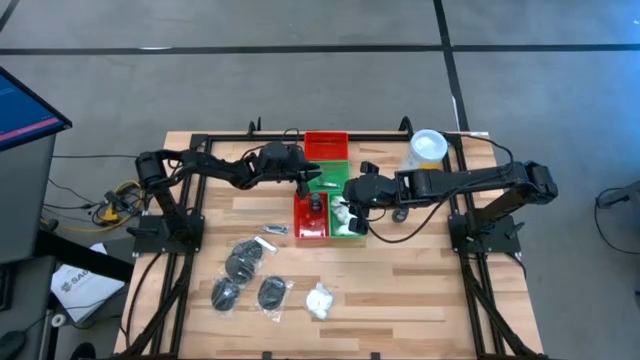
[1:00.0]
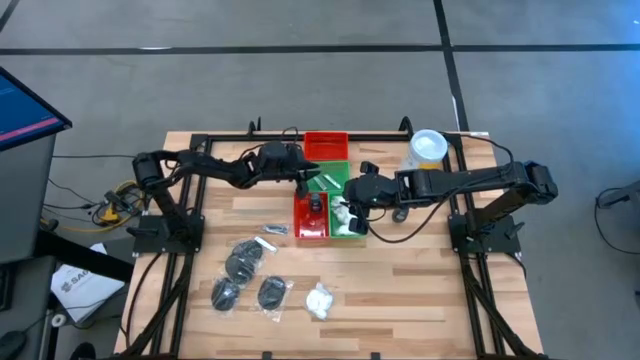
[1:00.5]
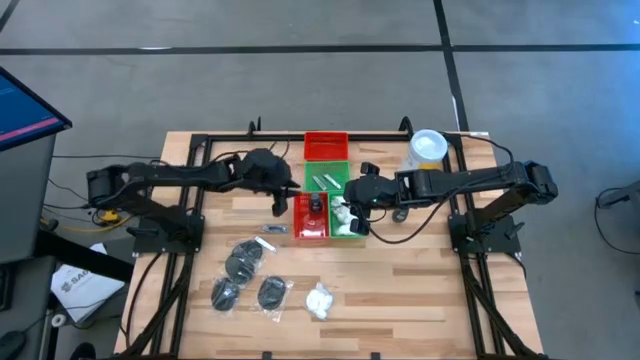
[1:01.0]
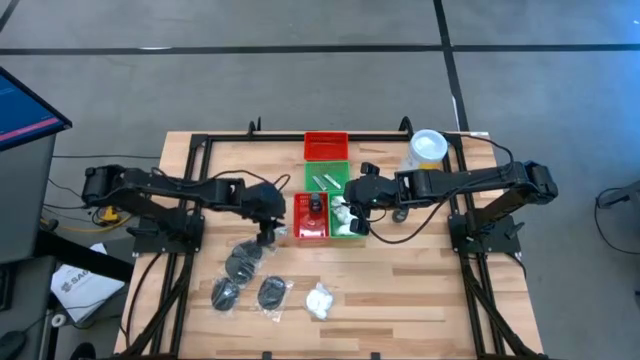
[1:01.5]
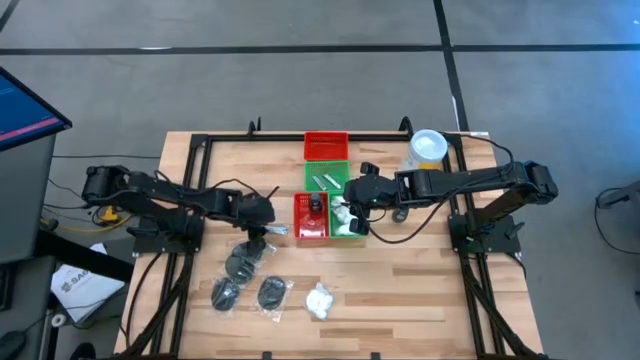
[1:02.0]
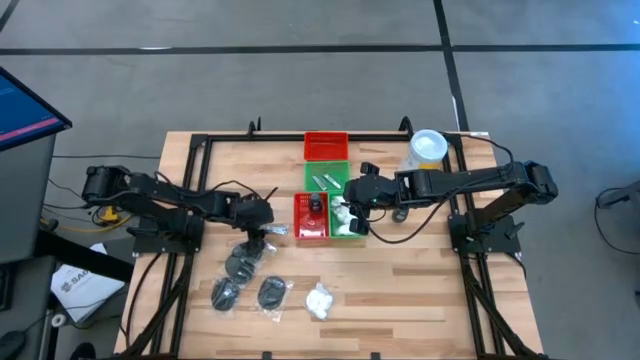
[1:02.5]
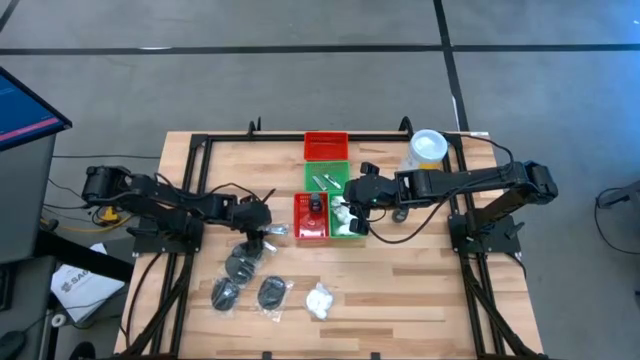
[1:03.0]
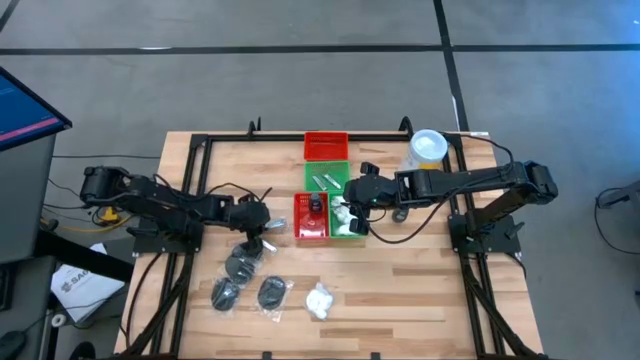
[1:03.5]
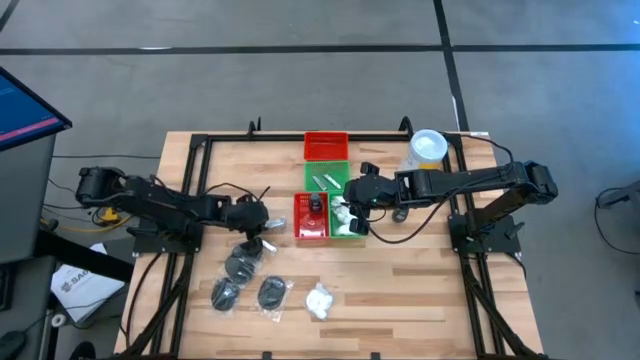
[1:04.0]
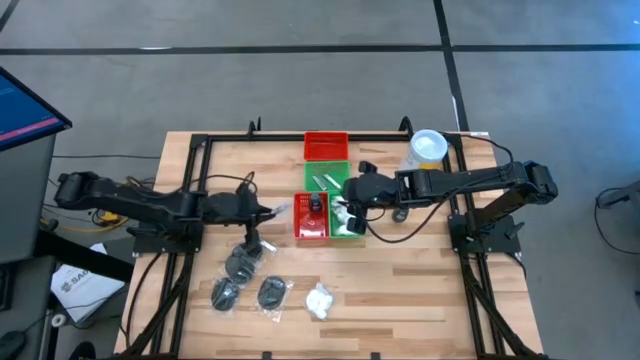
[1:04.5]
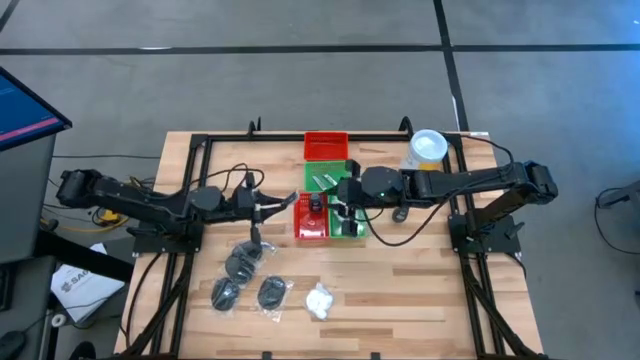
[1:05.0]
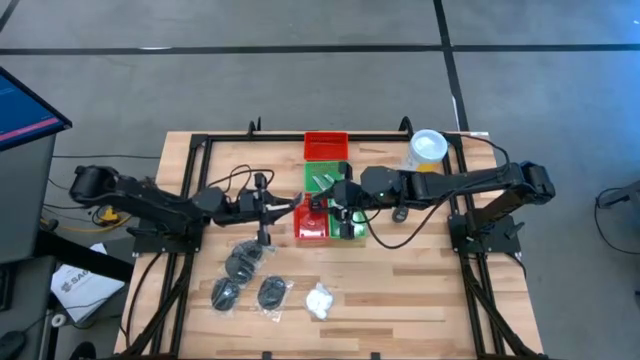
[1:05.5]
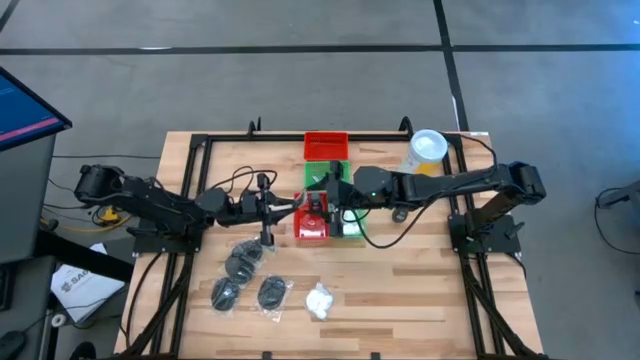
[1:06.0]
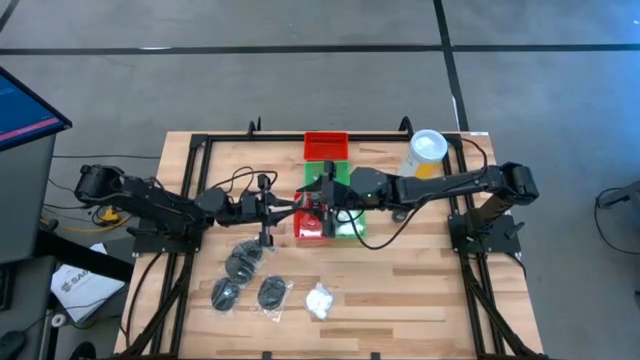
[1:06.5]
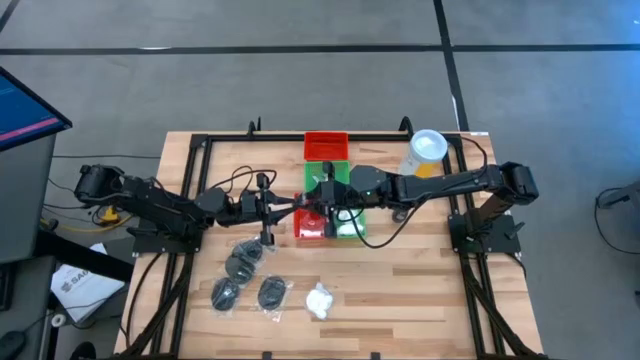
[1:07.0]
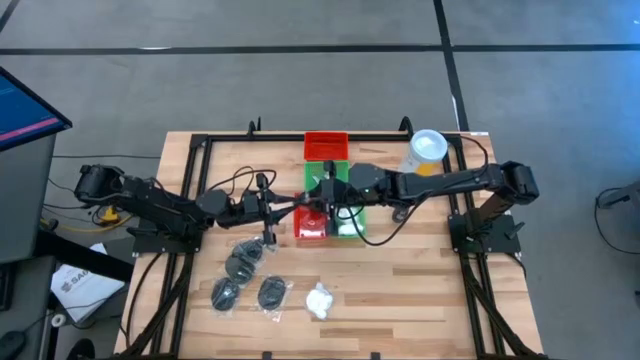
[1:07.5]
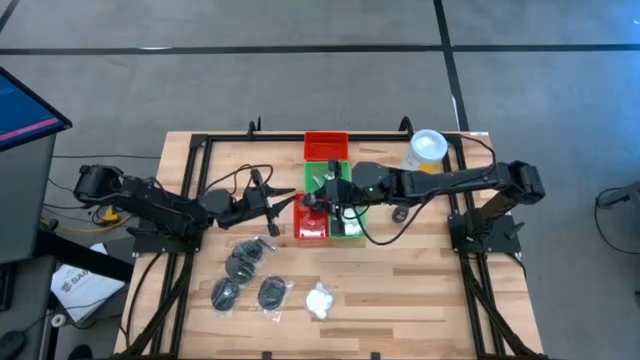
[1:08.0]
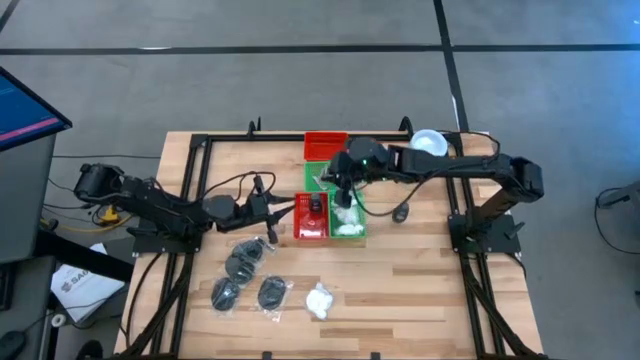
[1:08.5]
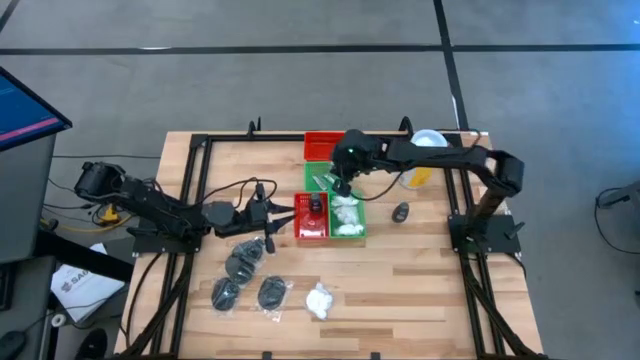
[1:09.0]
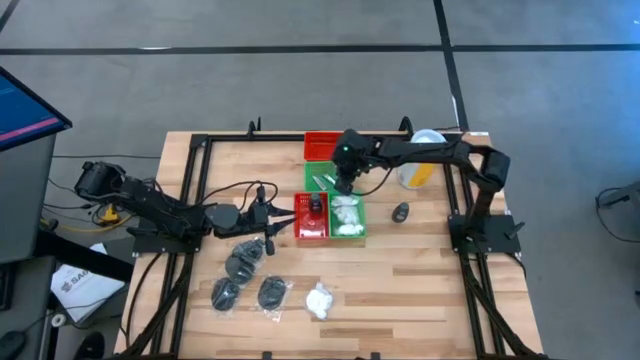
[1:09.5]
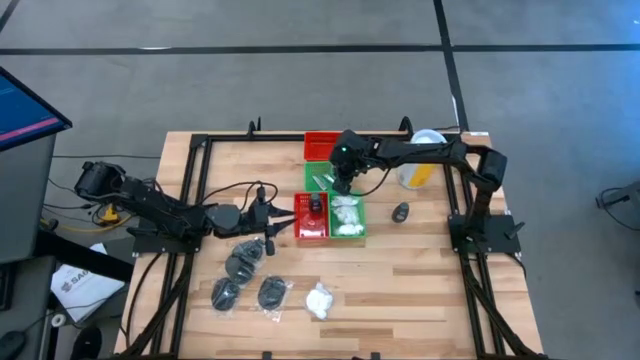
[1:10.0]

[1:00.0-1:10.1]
Task: Pick & Place Travel size toiletries
Put the silver nail cutter into the top green bin

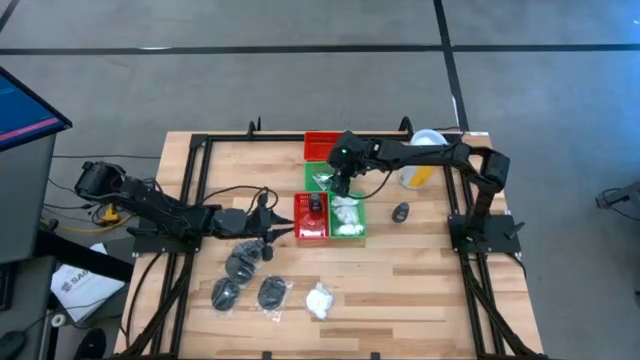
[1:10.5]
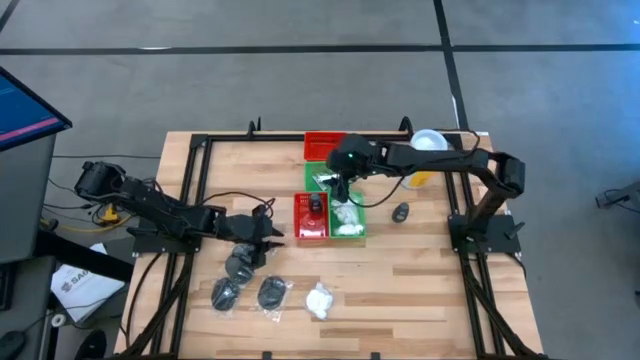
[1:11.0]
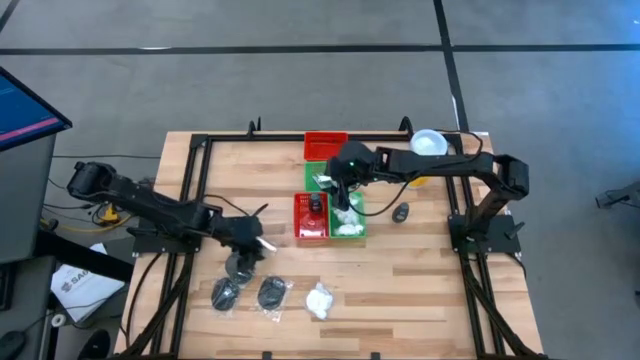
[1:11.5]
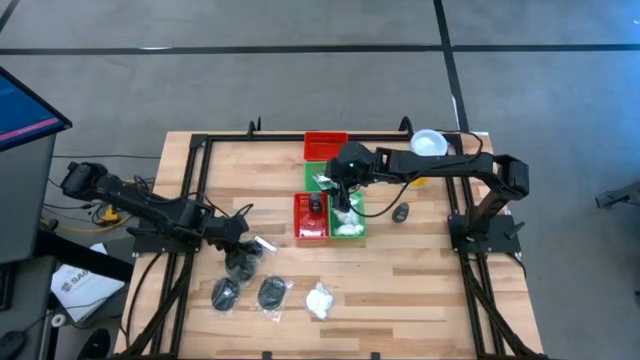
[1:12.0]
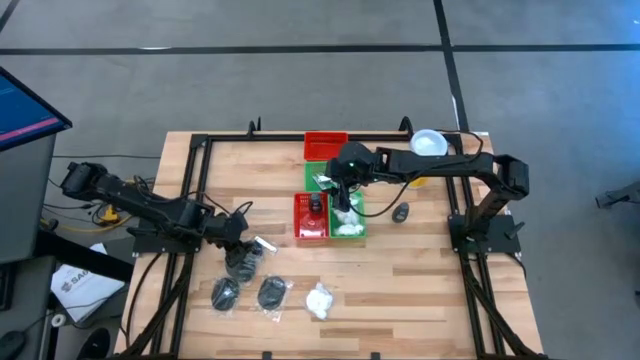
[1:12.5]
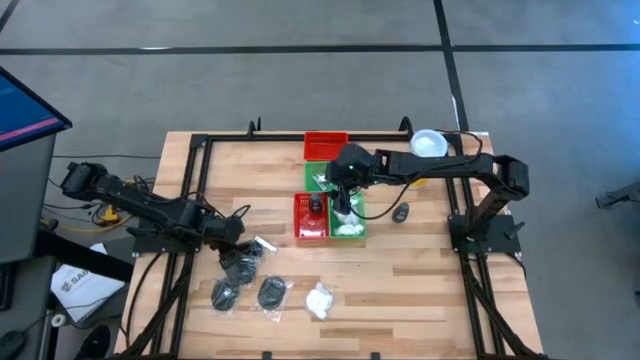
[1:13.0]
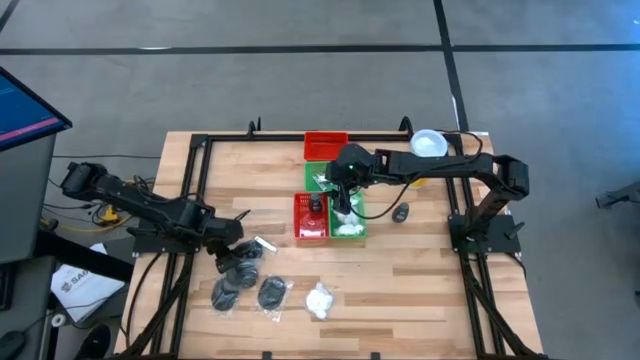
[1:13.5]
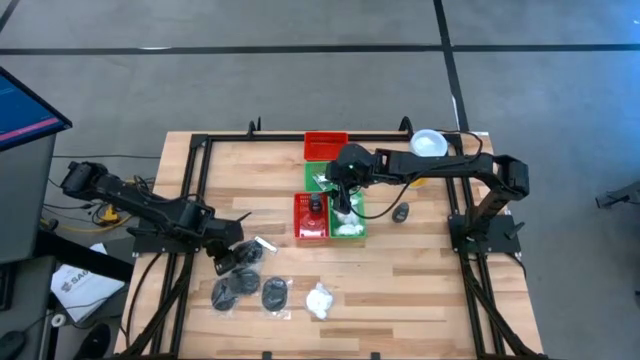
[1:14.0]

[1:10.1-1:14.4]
Put the black hairbrush into the top red bin

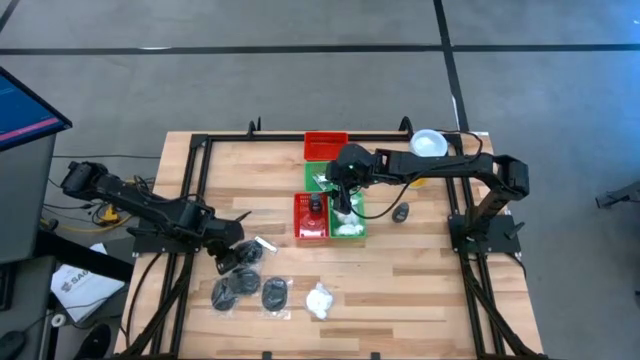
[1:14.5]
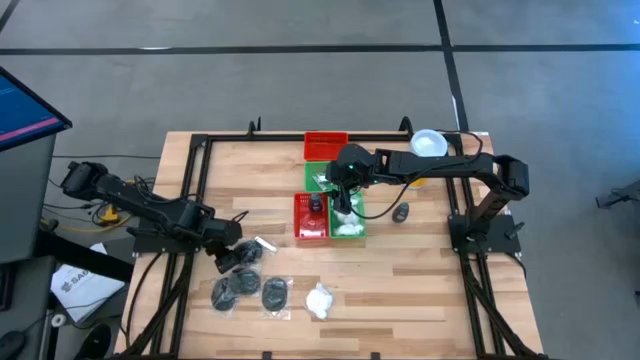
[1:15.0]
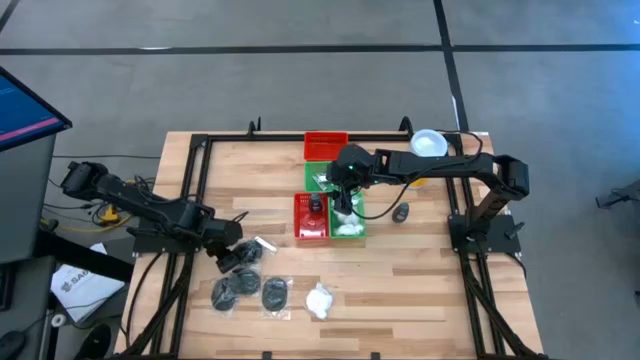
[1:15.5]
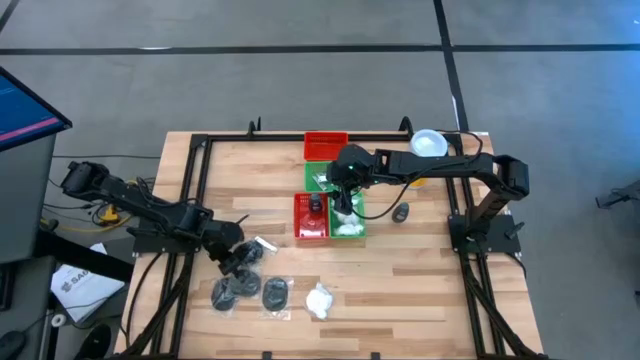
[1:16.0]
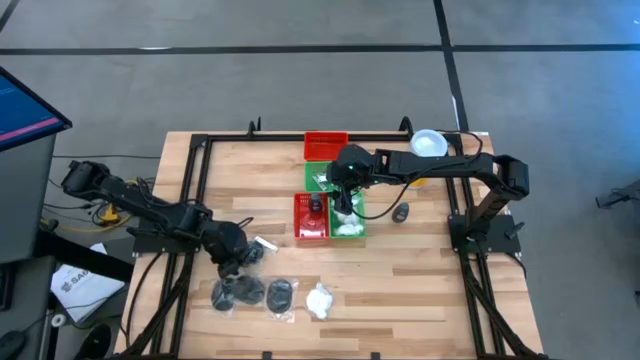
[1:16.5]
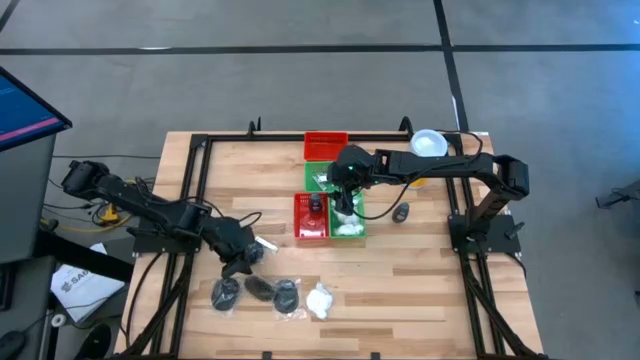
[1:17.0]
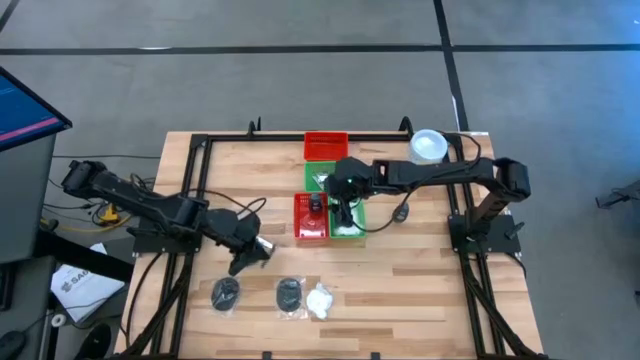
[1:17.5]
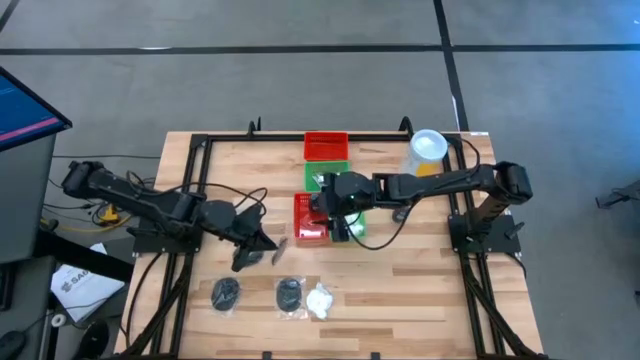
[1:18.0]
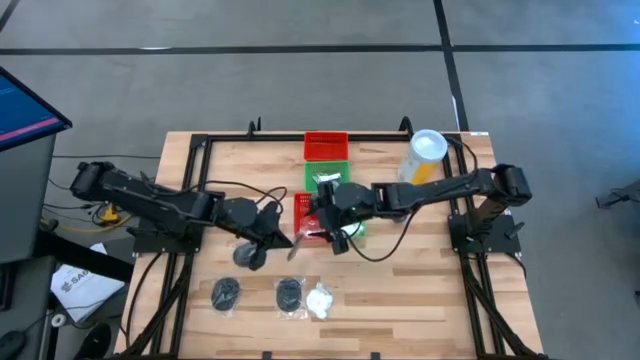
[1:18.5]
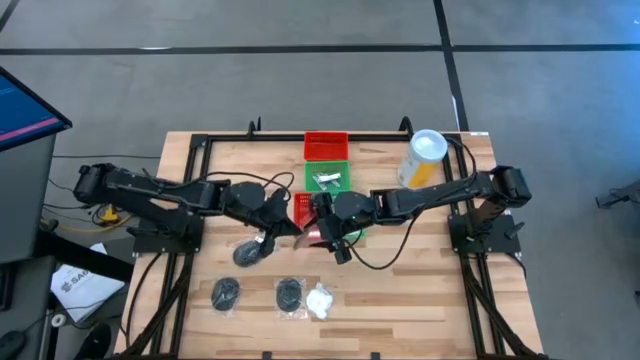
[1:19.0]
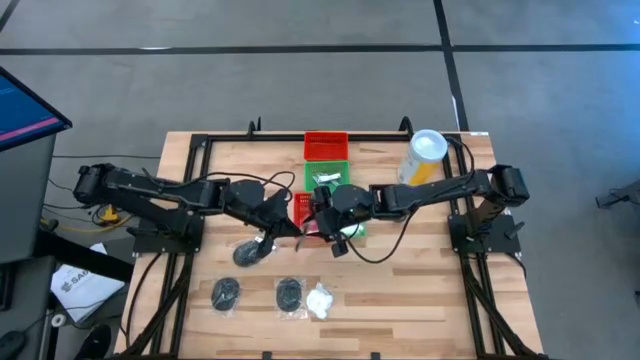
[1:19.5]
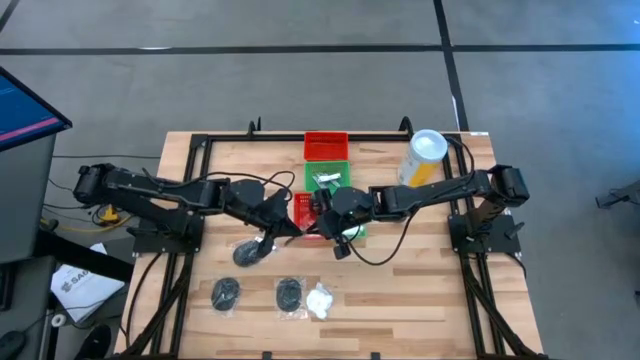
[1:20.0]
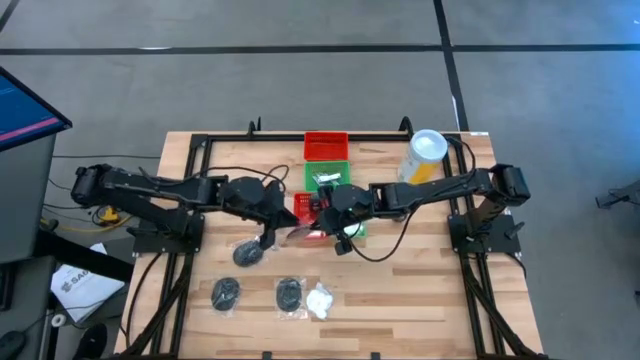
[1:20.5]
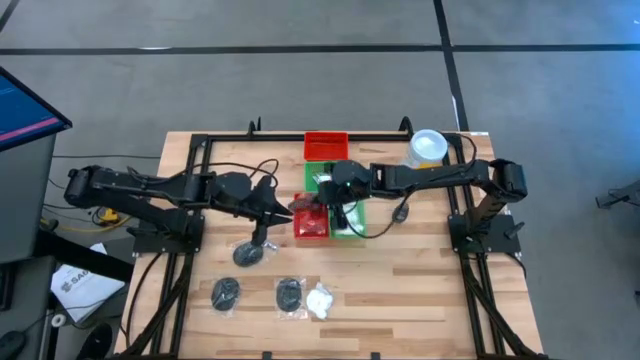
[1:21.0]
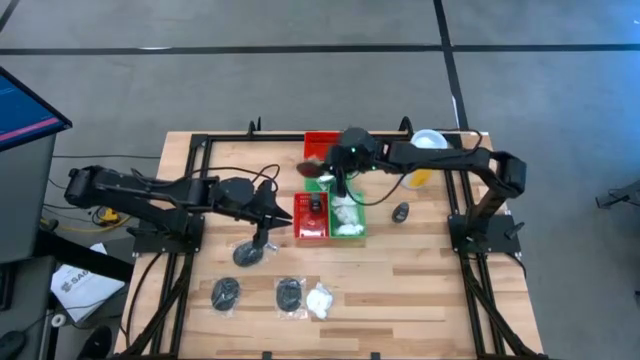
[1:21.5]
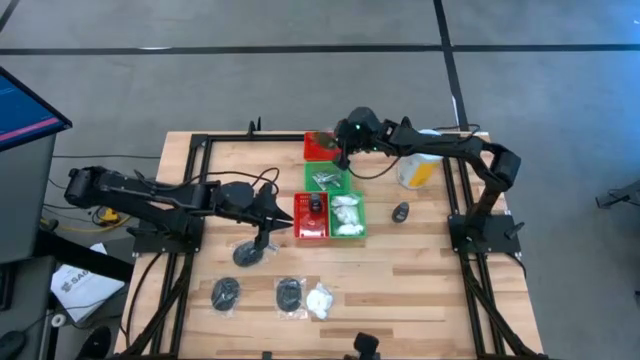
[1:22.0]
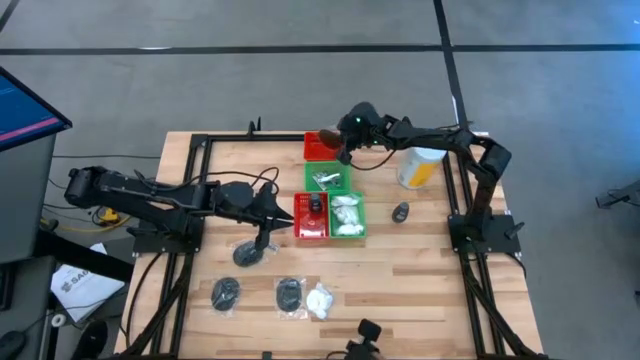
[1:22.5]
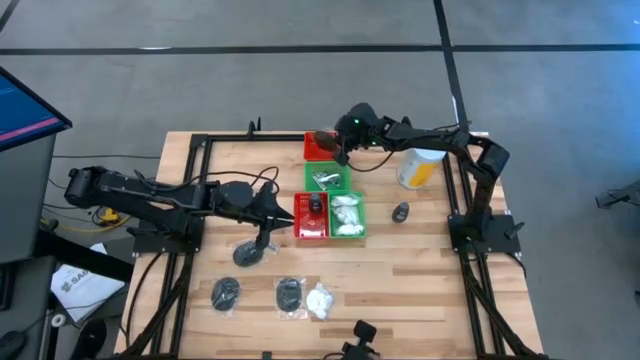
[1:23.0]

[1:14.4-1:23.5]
Put the black hairbrush into the top red bin
